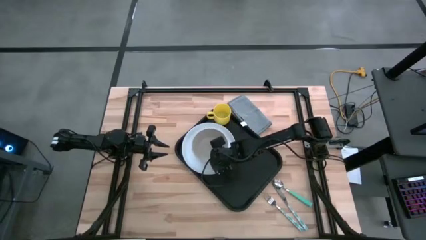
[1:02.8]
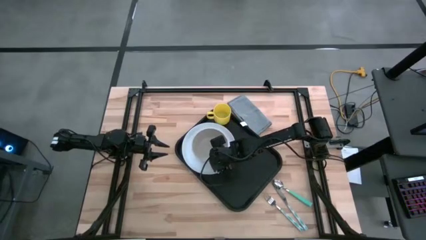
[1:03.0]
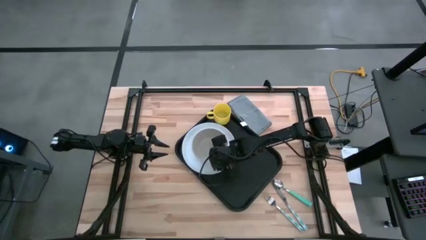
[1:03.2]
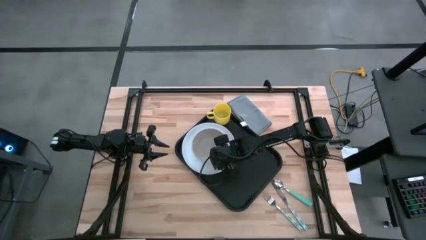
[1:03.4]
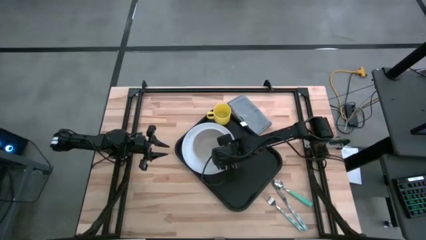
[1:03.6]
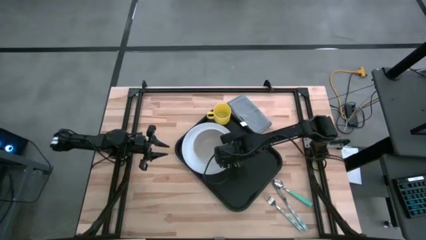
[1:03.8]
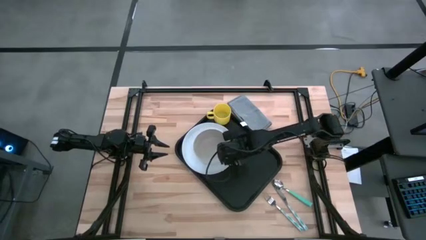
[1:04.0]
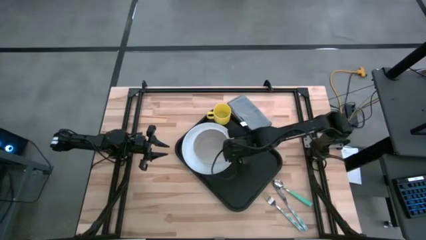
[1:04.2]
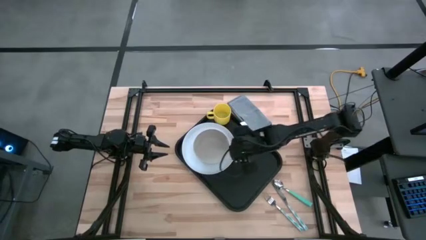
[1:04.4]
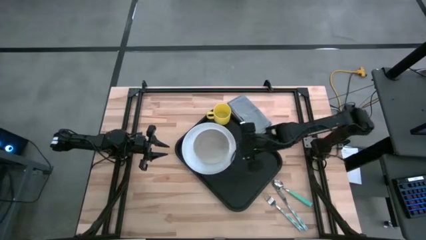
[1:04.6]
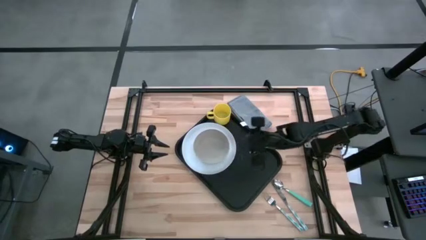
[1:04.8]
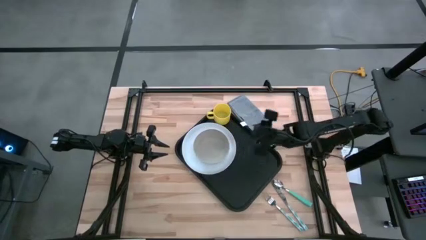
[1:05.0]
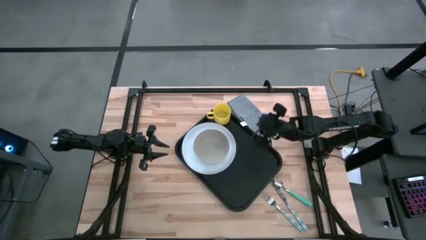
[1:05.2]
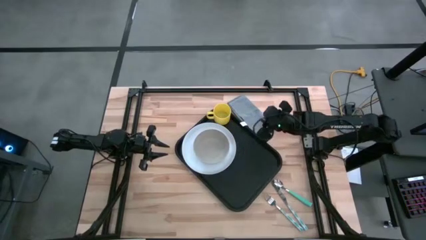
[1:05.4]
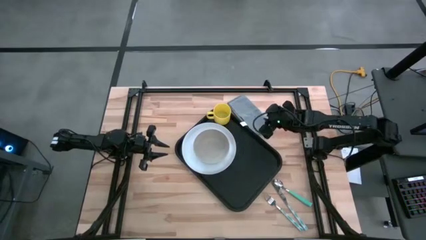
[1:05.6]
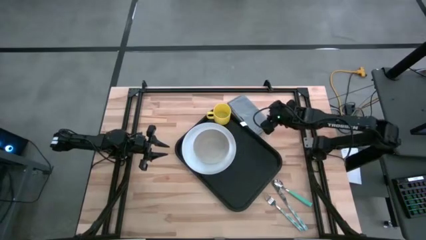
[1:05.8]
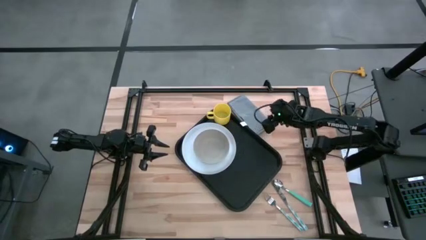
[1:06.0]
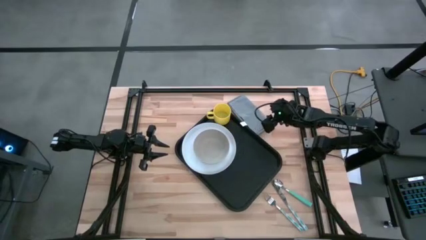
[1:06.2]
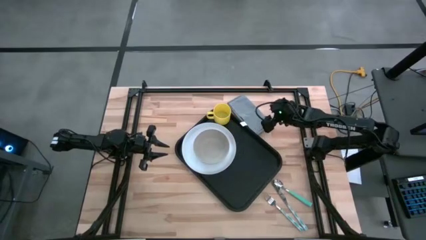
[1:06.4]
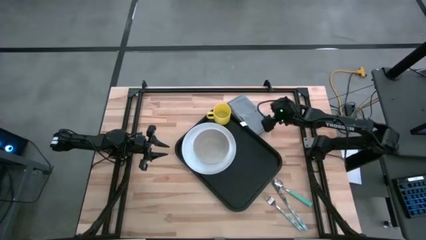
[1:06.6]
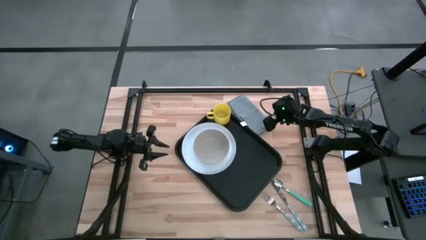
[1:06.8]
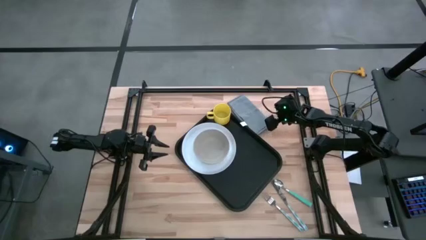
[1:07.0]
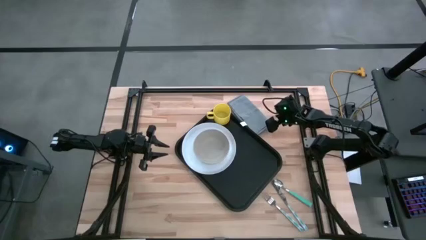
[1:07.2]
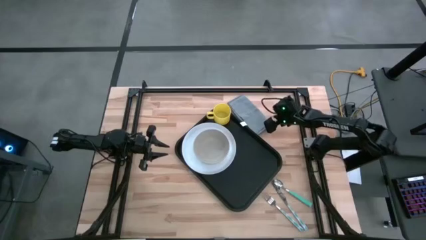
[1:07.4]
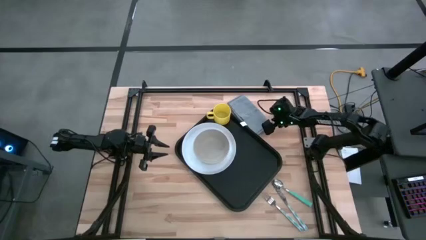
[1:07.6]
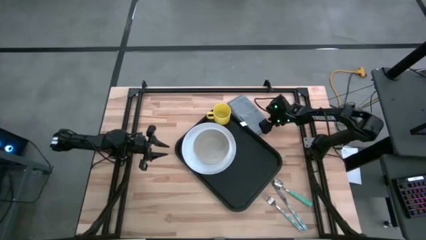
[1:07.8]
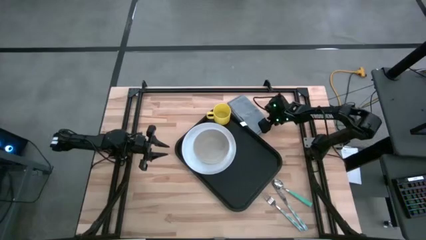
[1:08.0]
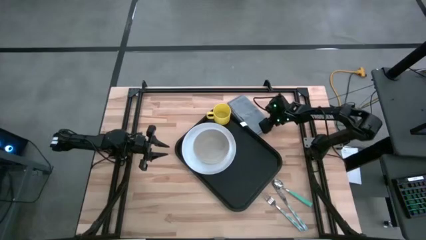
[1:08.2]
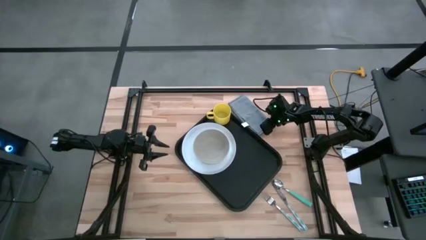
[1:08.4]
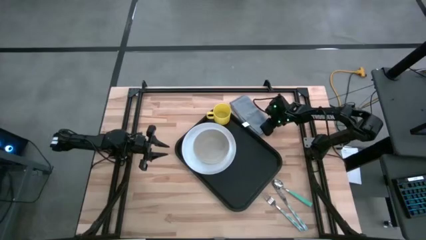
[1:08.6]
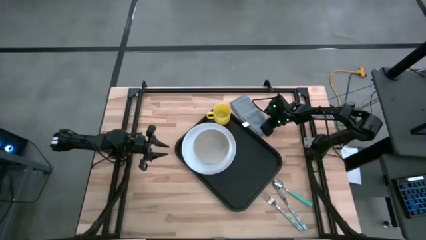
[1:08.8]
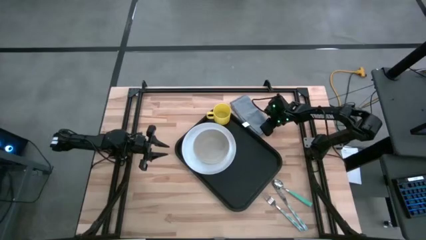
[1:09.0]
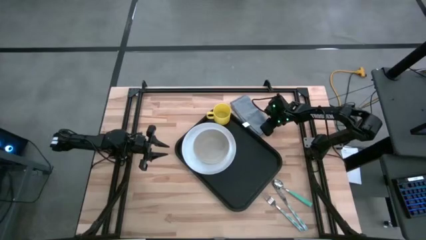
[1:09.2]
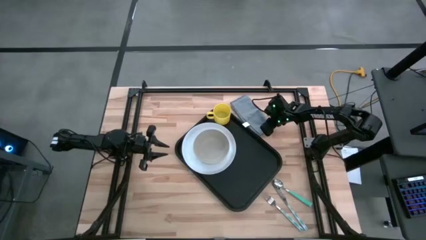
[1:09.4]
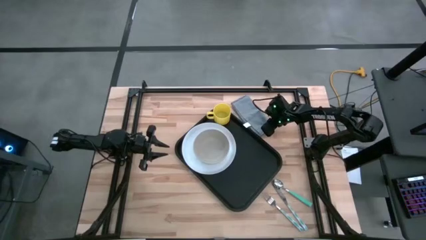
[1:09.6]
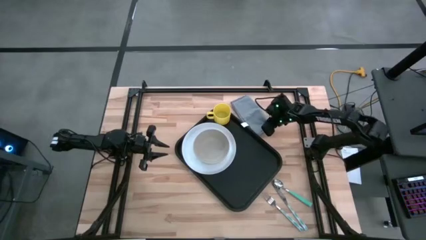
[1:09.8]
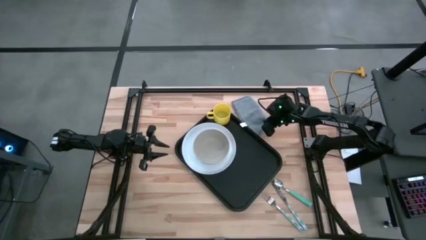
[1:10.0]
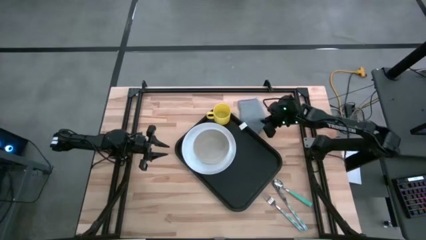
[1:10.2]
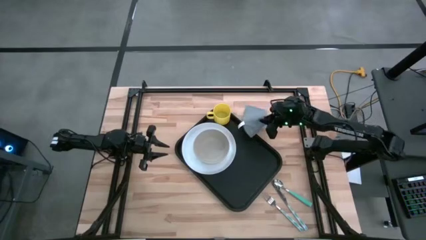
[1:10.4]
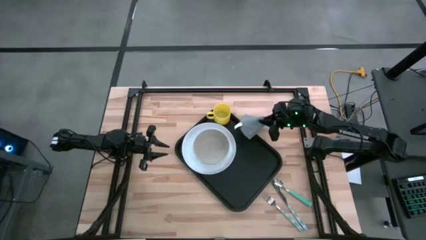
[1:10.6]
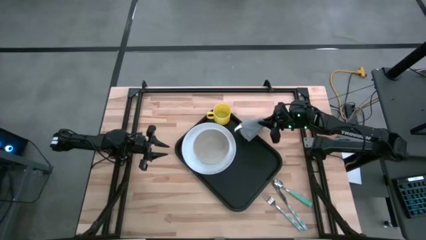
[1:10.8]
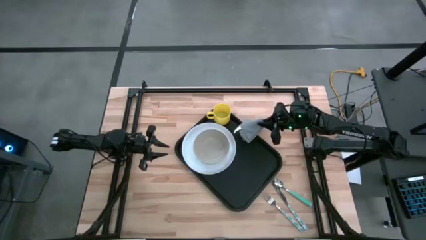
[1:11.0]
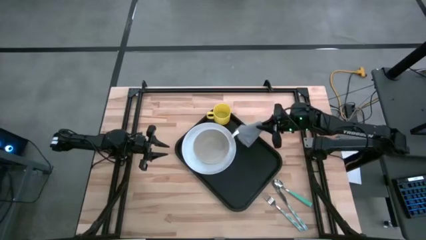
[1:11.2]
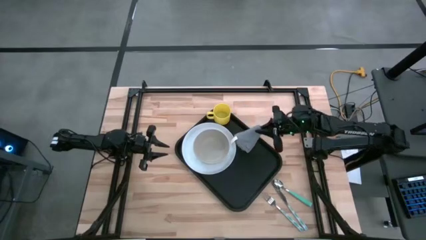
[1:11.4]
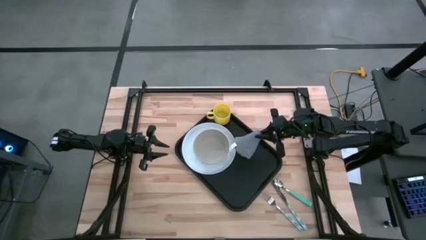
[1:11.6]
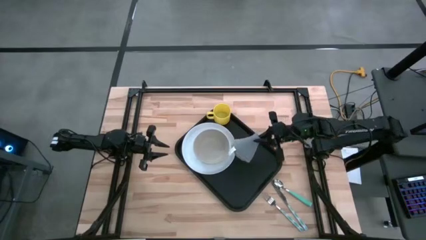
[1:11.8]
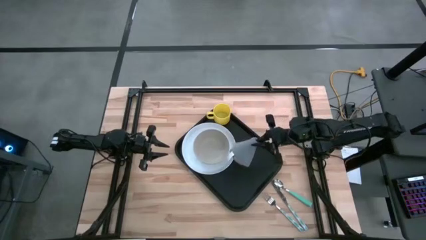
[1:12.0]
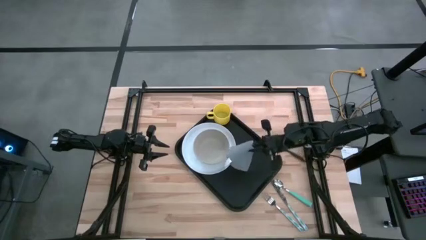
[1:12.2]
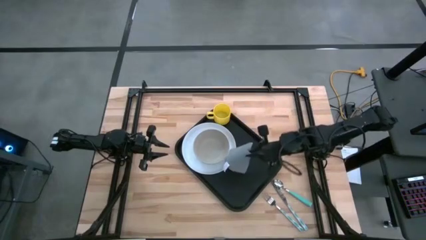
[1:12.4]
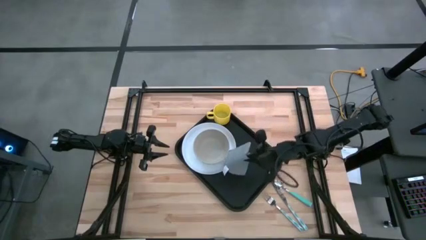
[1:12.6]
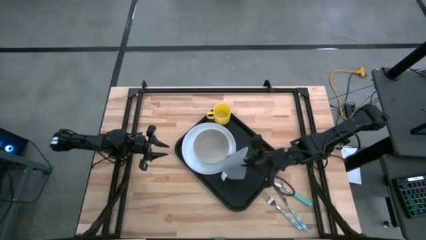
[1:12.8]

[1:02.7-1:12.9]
Task: Set up tray
Put the gray napkin to the right of the white plate on the black serving tray

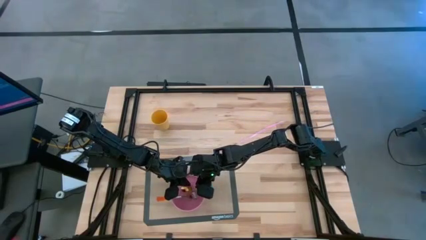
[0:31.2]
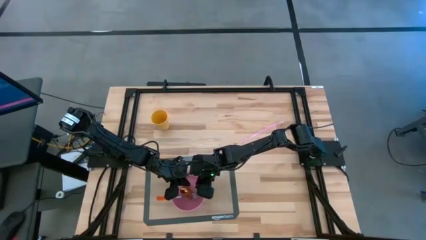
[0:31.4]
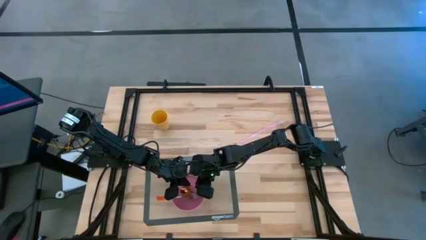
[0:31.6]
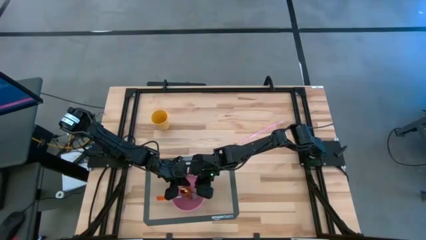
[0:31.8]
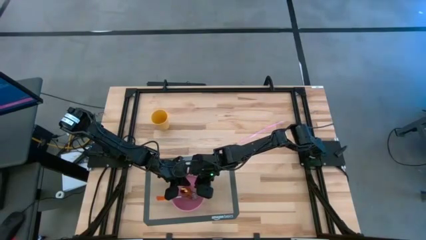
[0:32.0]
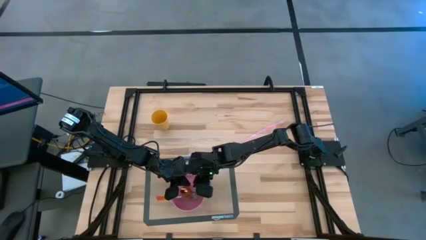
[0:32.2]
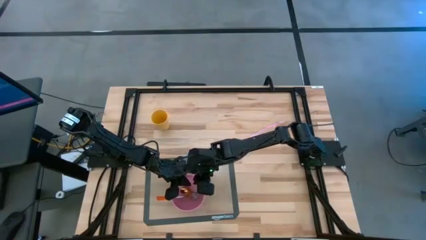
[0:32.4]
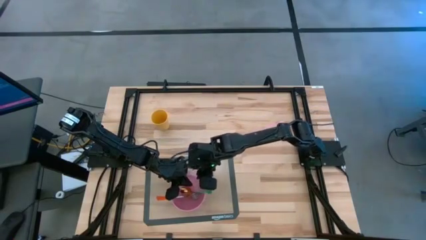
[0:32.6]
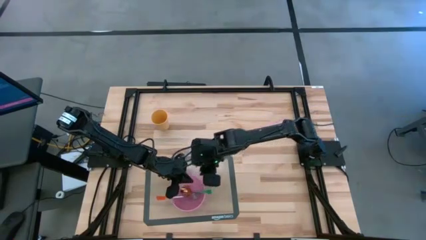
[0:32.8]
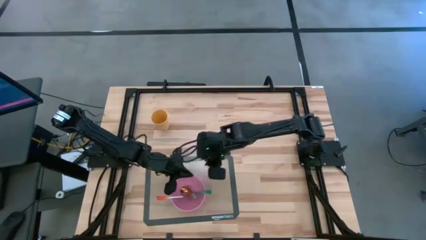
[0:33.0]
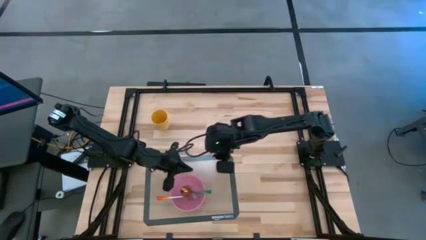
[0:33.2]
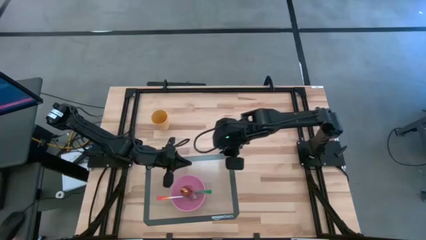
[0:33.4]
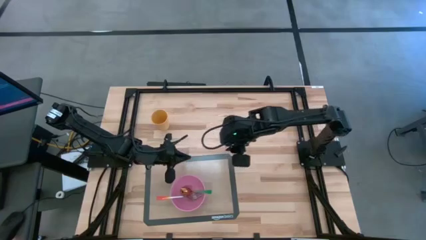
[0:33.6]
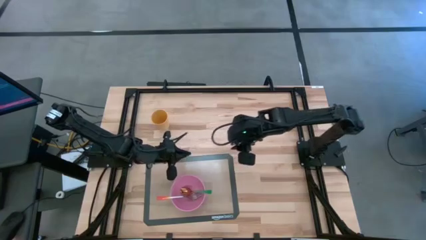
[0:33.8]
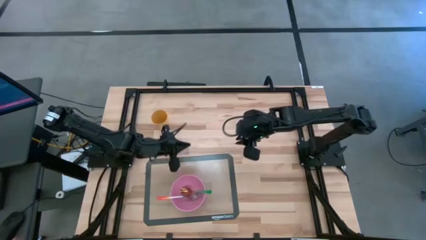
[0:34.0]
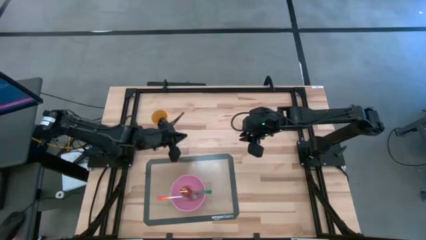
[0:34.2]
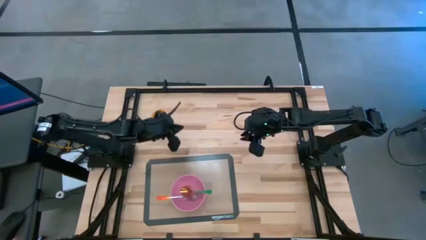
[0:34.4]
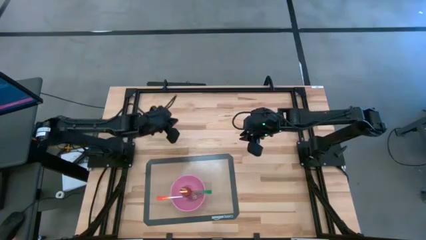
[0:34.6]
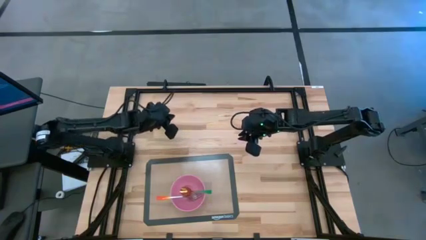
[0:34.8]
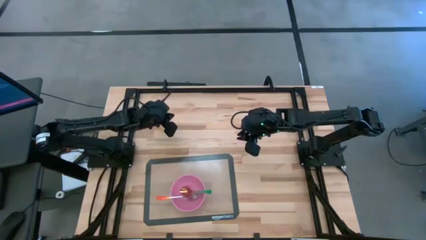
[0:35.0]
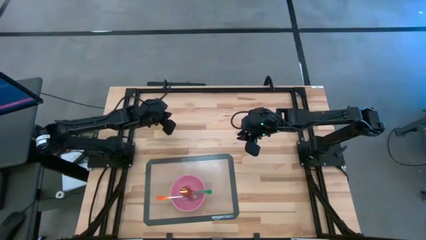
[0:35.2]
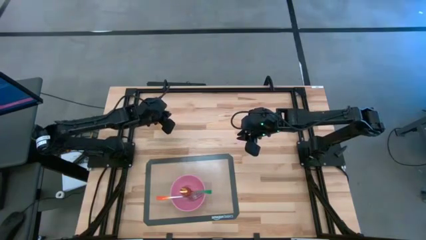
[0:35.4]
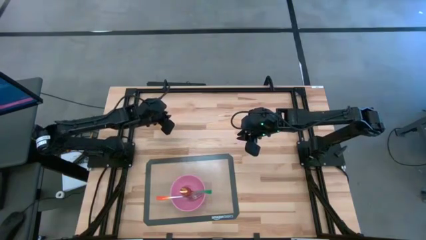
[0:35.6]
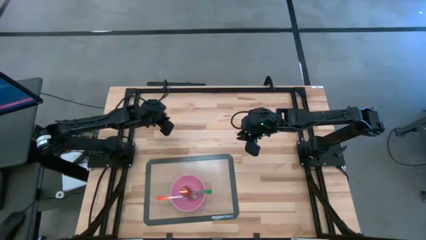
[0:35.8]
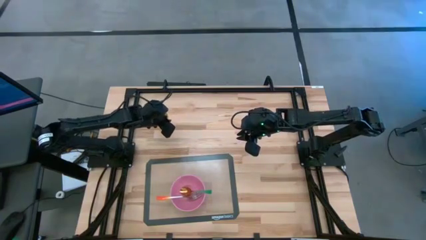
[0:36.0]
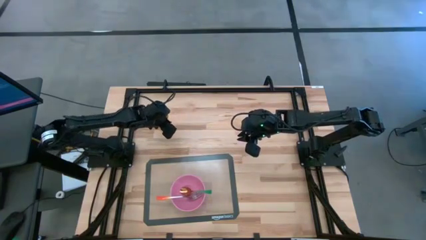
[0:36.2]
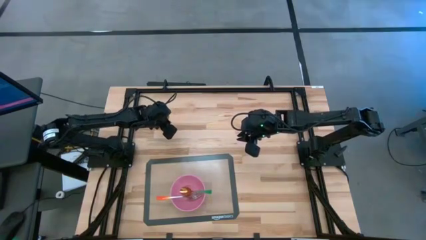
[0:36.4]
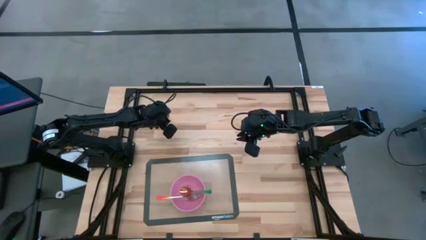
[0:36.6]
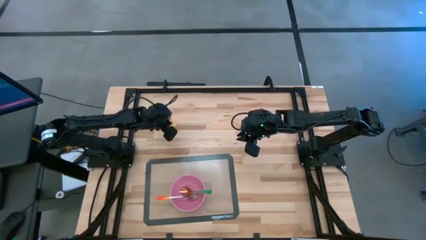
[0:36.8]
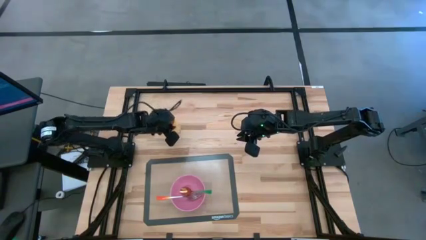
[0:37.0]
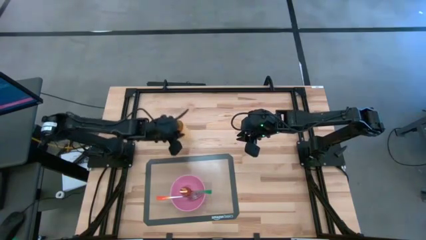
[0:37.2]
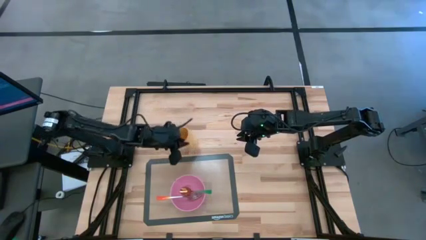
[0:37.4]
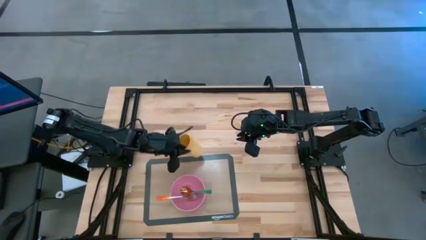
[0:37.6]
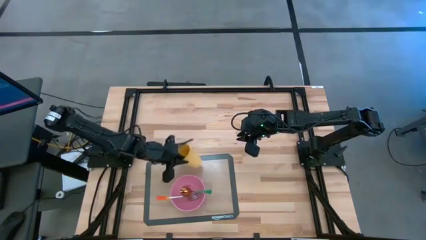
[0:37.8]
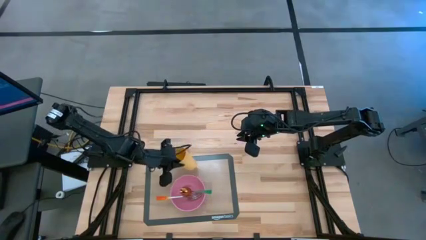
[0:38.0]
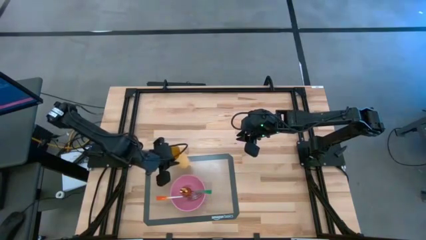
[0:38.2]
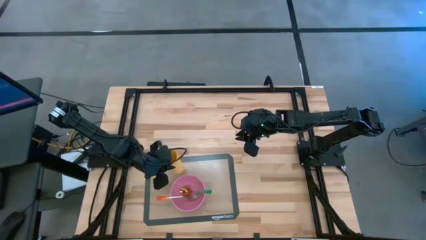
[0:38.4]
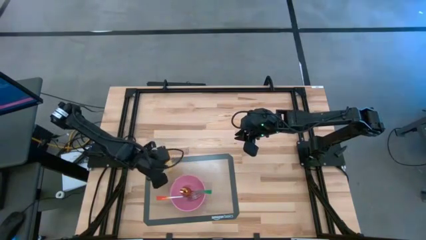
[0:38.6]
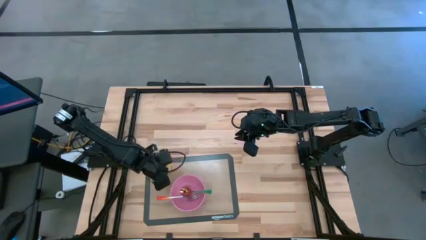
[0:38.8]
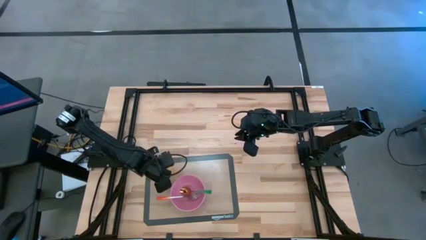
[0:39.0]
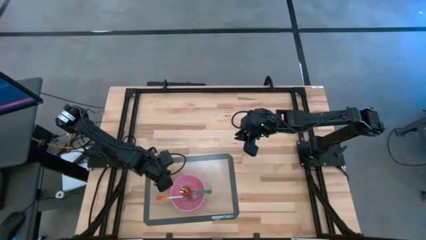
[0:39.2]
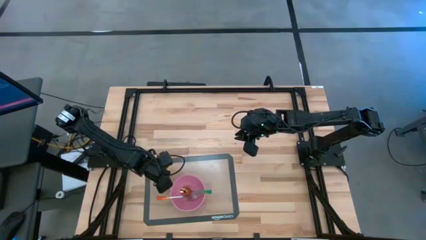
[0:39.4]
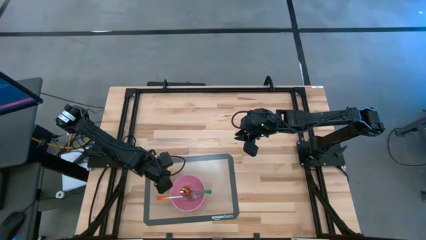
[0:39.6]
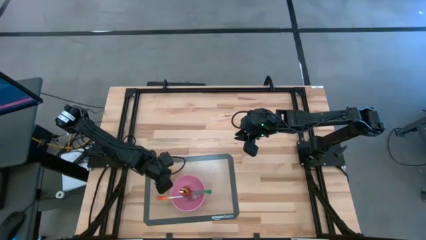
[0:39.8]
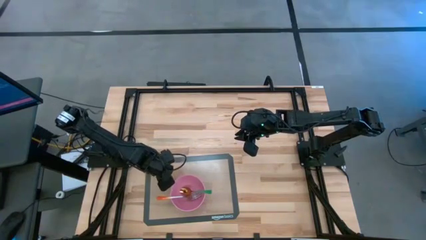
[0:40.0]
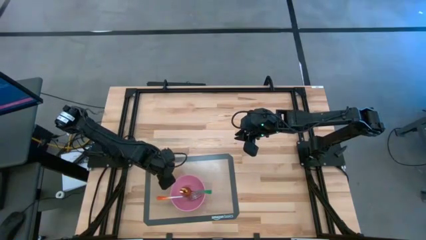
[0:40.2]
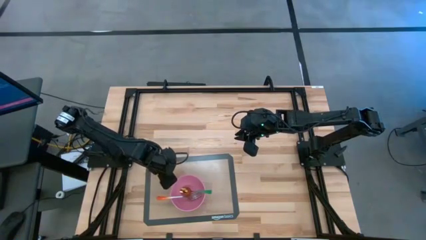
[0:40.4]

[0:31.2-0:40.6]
Task: Pick & Place Utensil
Put the yellow cup on the transparent mat to the top left of the pink bowl
